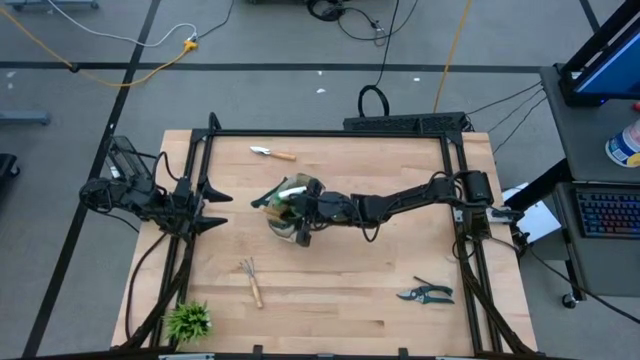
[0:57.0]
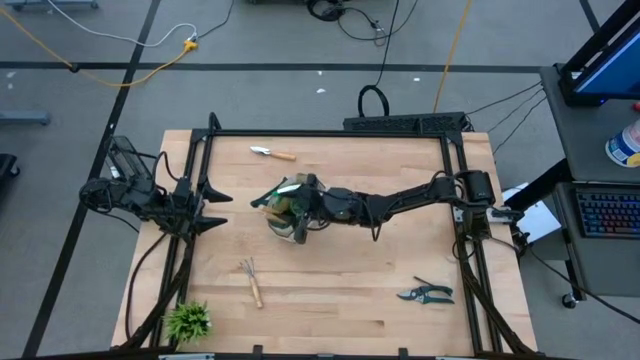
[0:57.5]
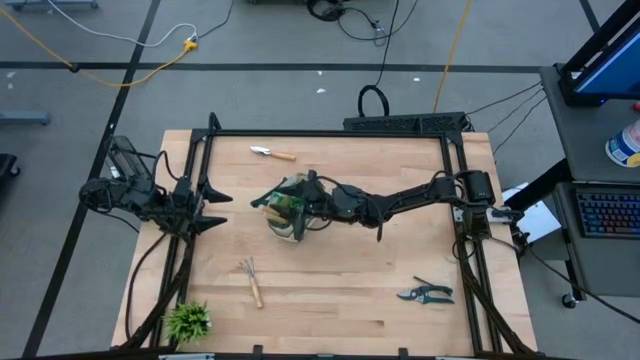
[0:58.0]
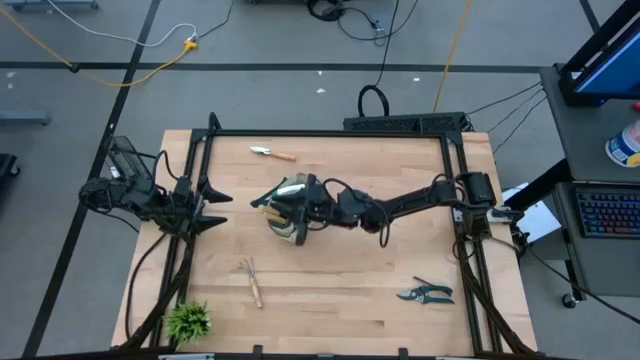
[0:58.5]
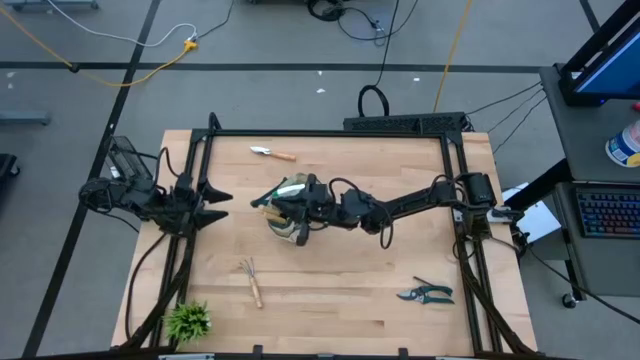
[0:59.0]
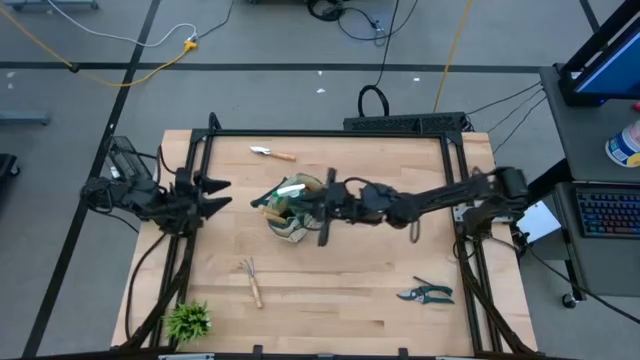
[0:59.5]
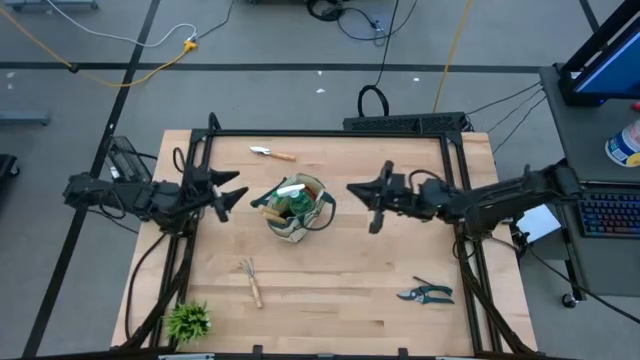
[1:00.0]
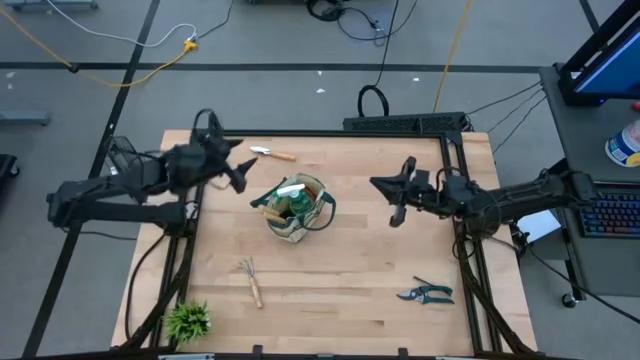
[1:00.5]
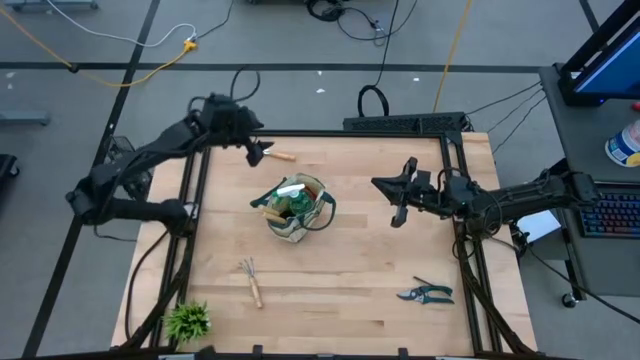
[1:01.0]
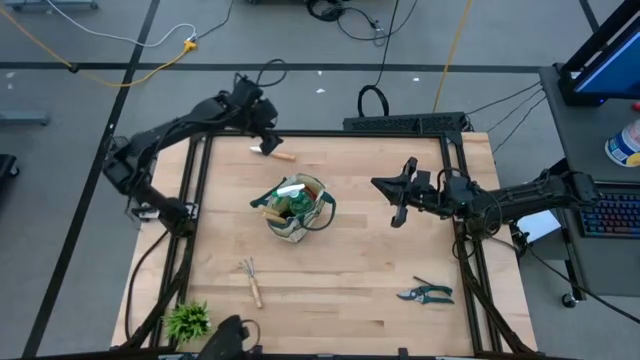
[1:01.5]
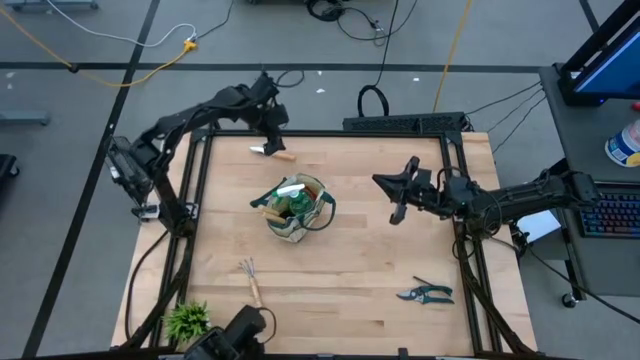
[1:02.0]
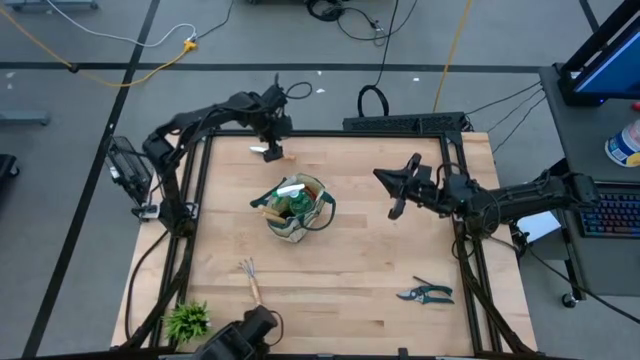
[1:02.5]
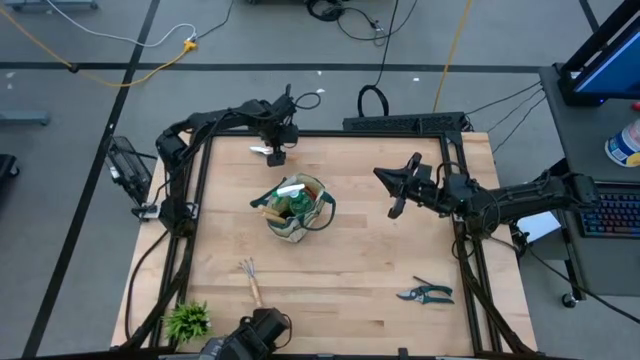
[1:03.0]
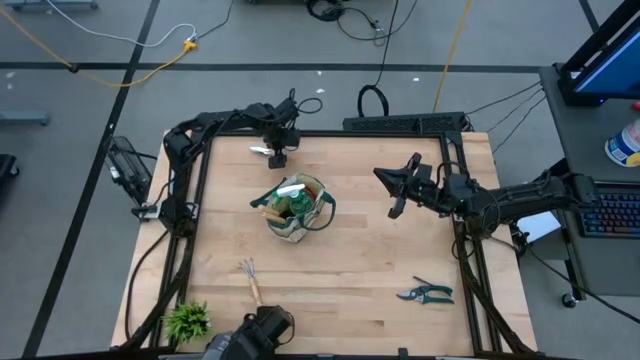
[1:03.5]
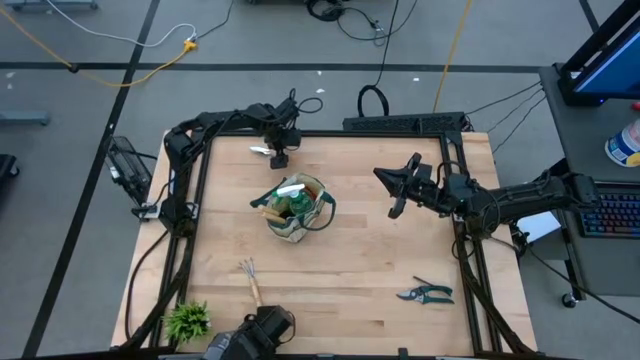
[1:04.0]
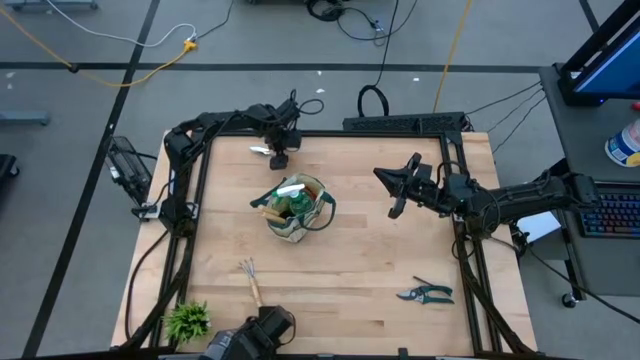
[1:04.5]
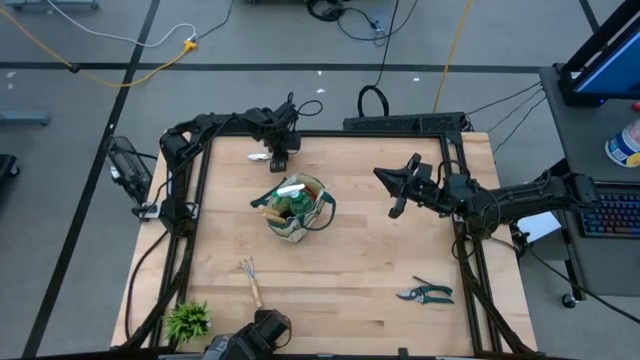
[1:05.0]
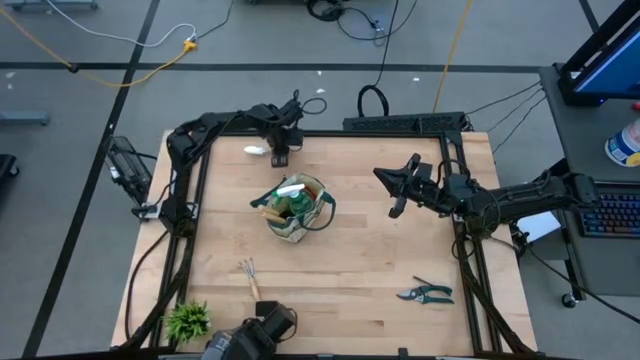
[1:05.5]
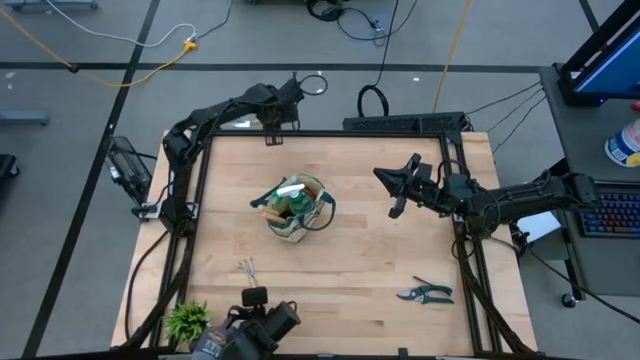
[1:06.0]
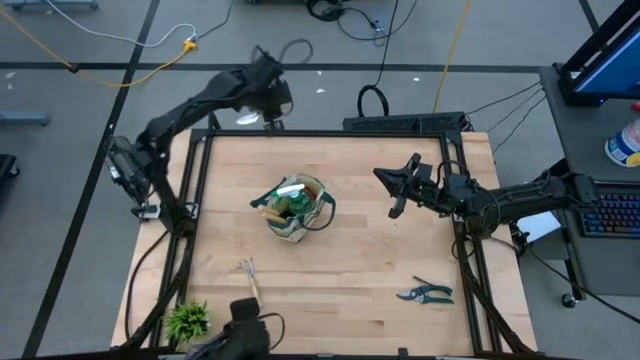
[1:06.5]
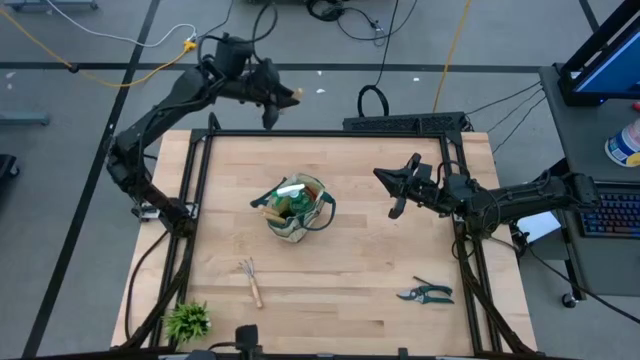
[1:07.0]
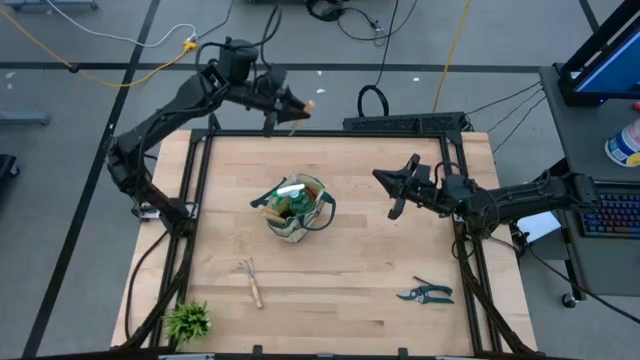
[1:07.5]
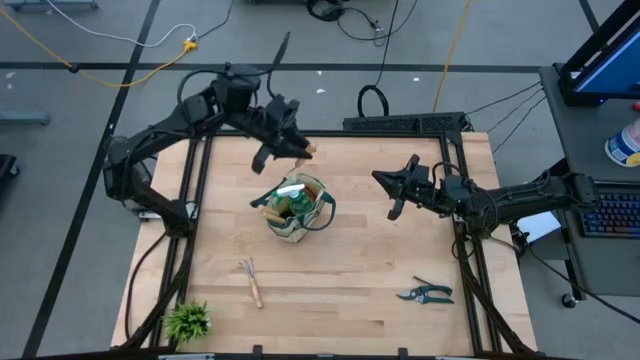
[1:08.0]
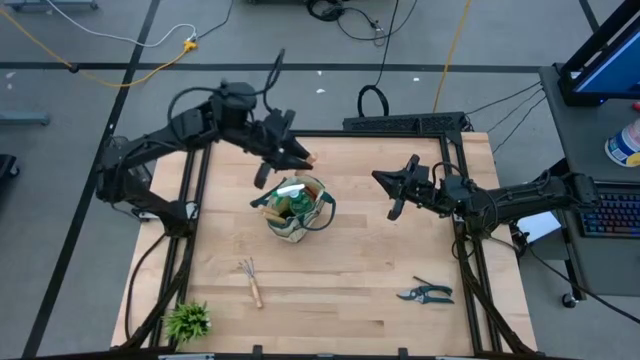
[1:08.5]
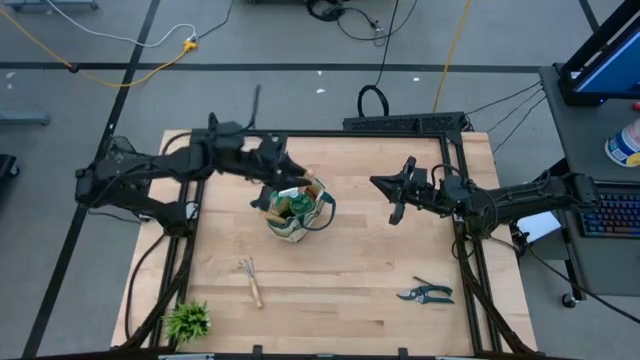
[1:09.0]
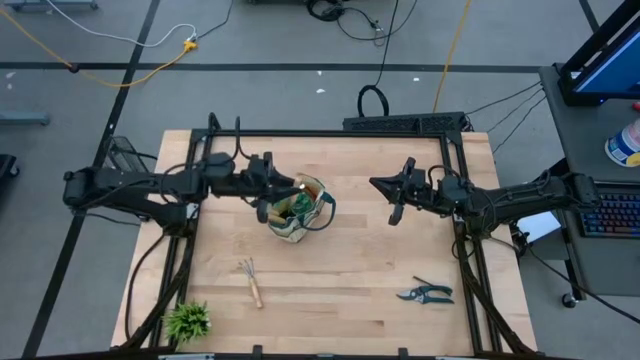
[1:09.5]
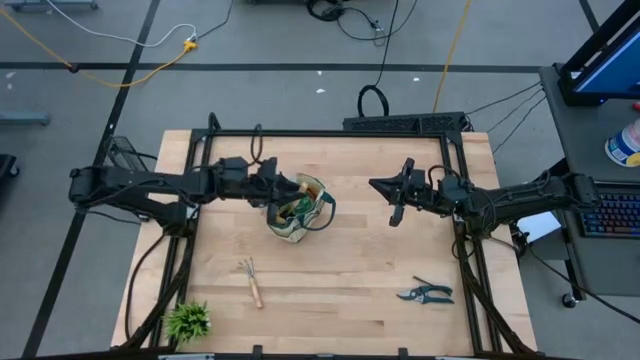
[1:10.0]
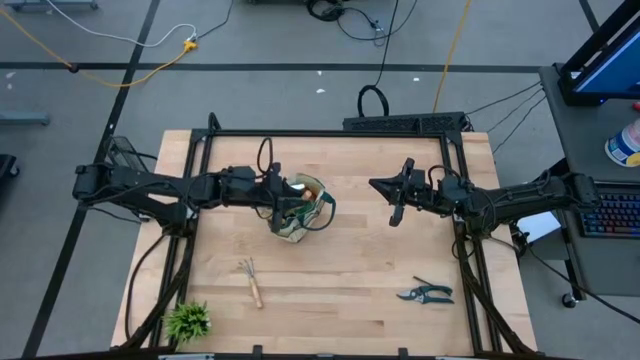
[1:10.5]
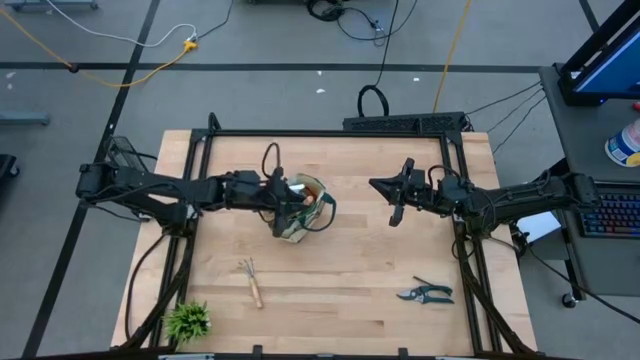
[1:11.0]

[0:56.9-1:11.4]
Task: Pick & Place Garden tools in Gardening bag
Put the brown trowel into the green gardening bag

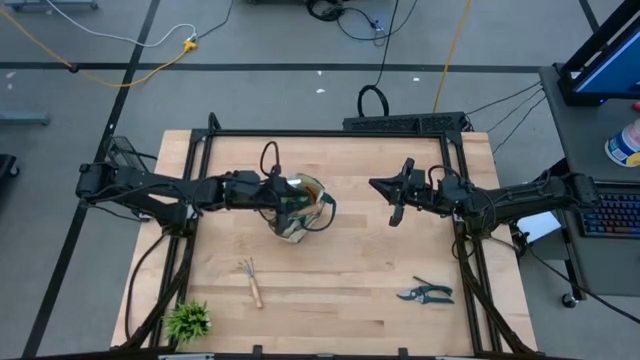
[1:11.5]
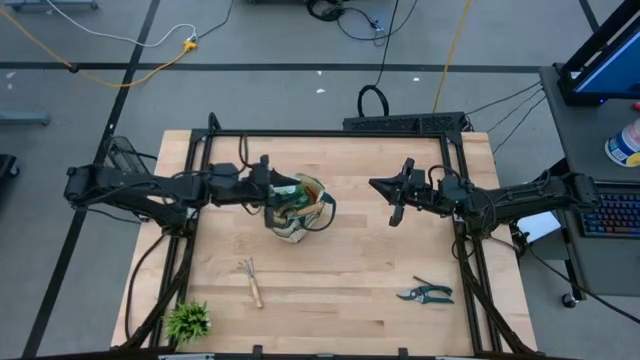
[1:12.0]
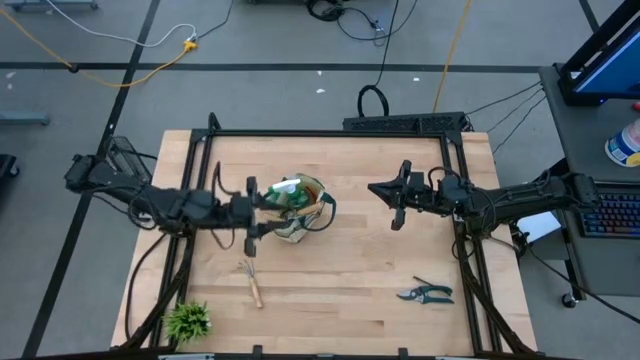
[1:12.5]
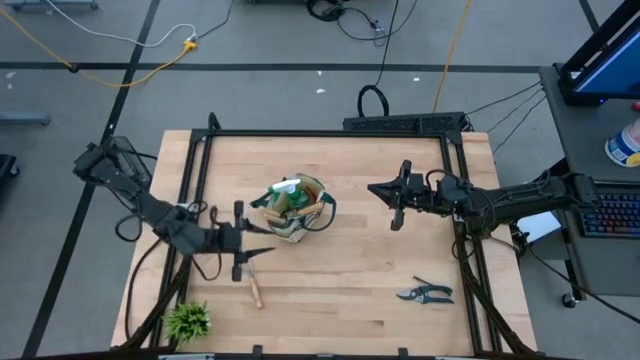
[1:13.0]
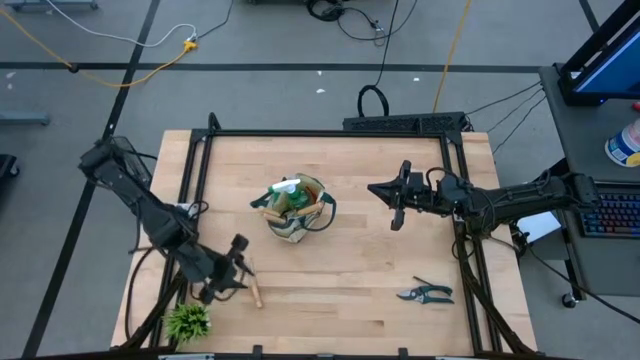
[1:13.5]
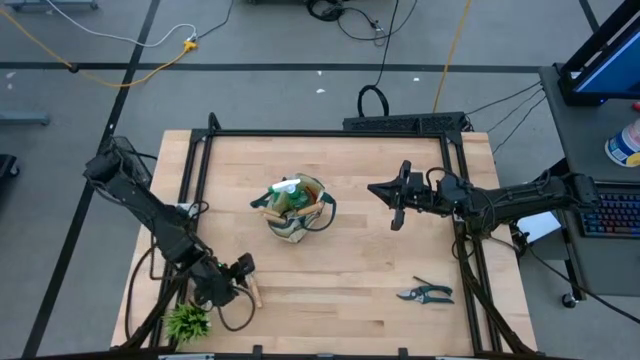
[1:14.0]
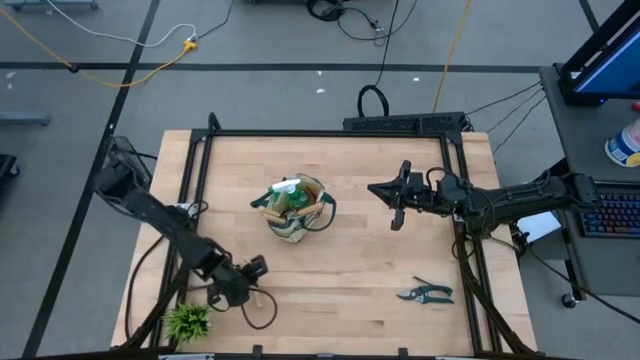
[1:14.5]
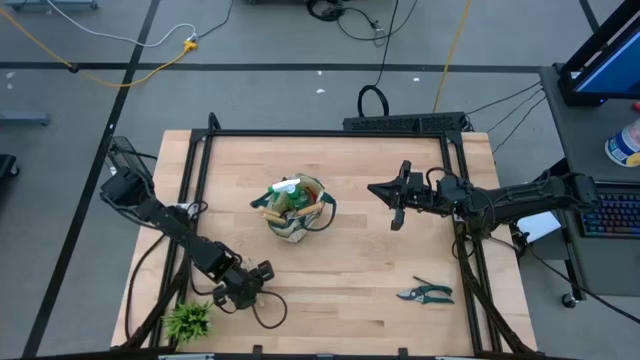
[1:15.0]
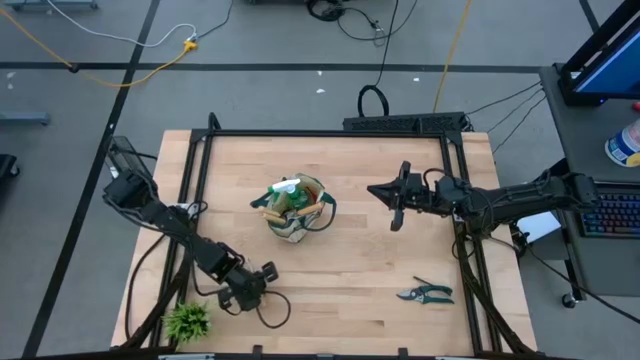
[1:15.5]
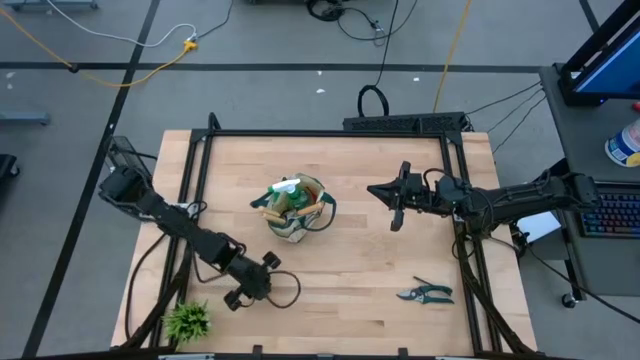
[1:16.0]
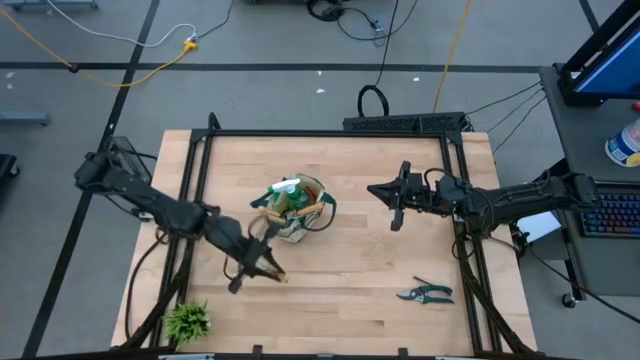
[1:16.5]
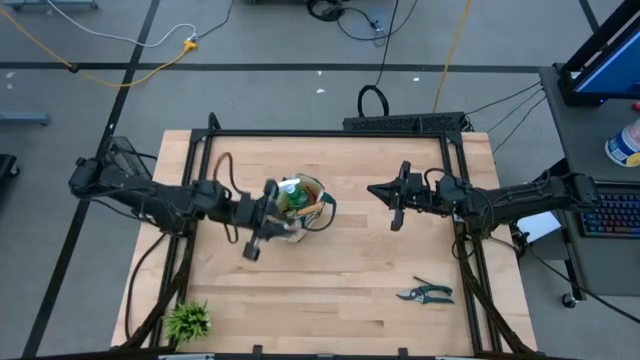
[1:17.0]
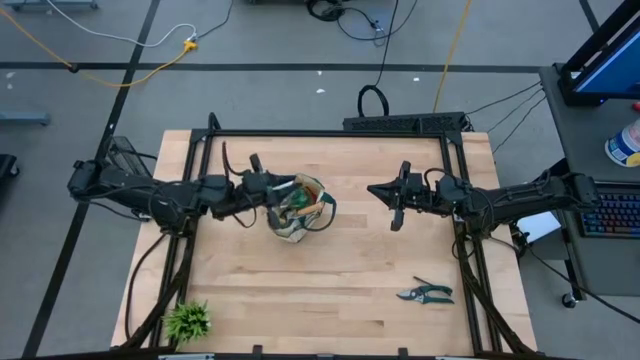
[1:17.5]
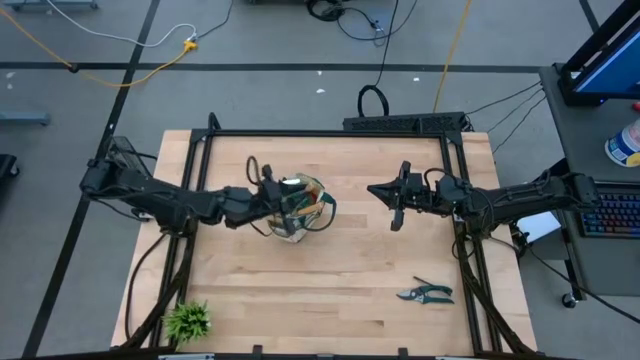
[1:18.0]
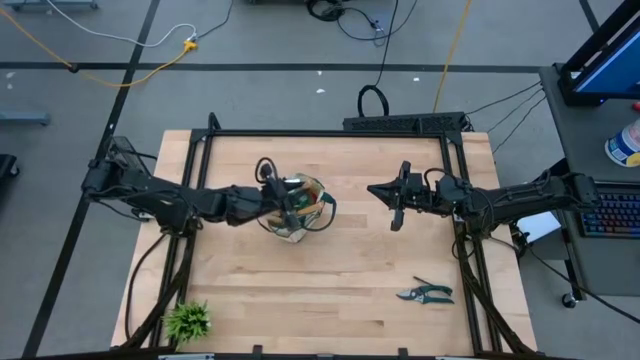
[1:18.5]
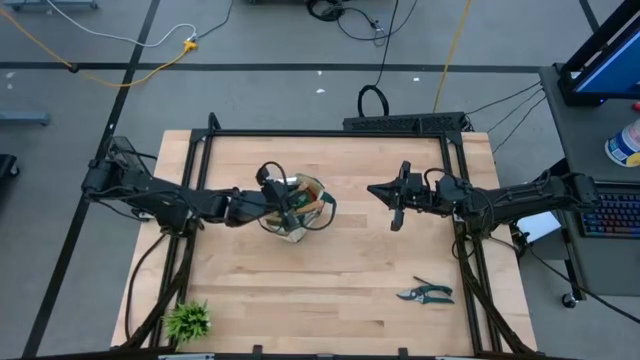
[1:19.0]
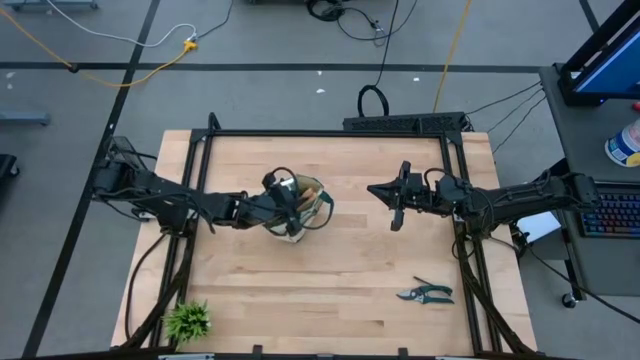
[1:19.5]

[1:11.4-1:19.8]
Put the brown hand rake into the green gardening bag
